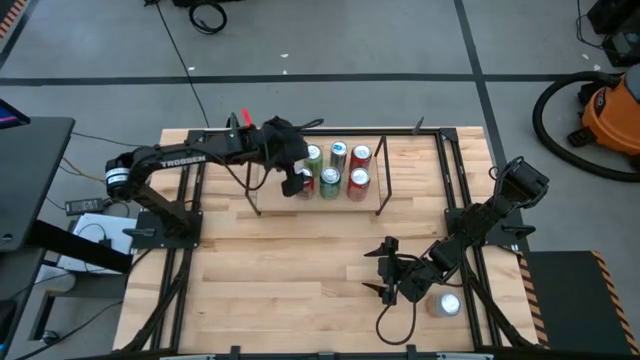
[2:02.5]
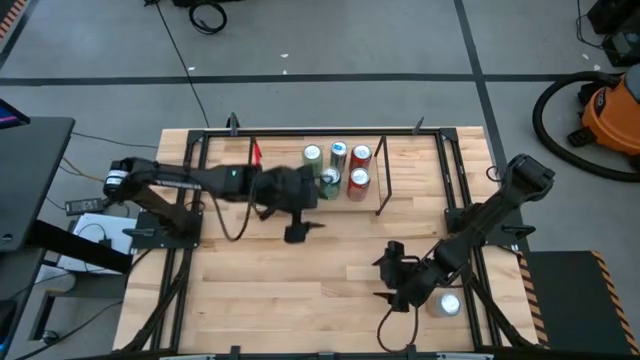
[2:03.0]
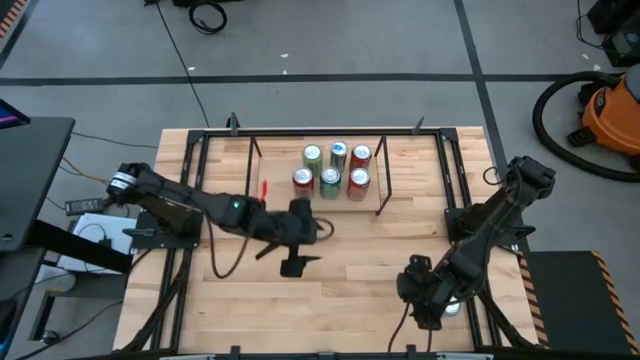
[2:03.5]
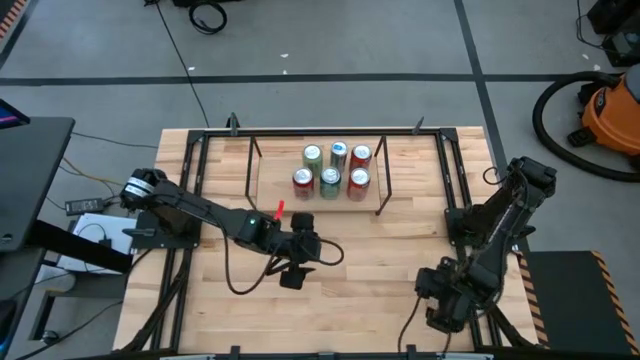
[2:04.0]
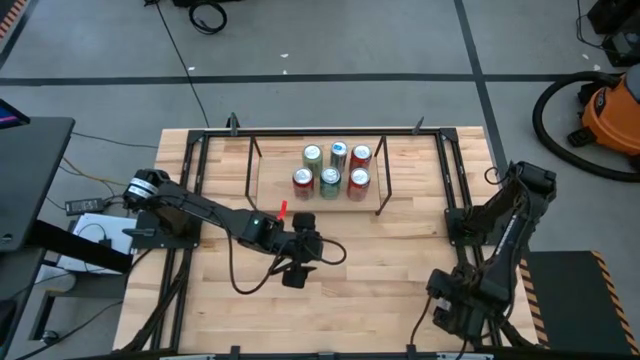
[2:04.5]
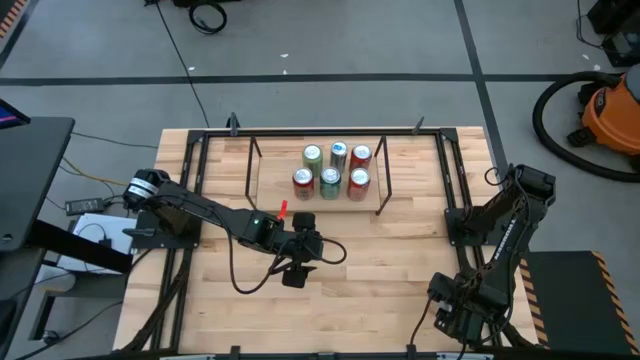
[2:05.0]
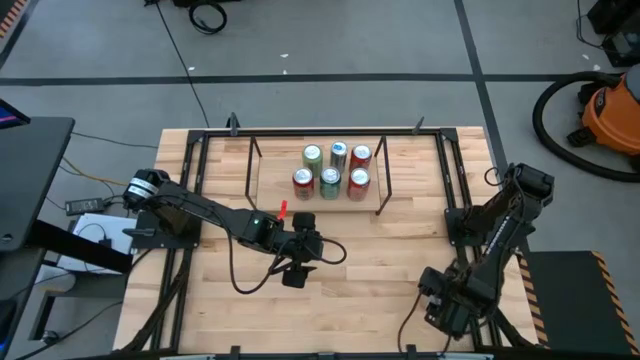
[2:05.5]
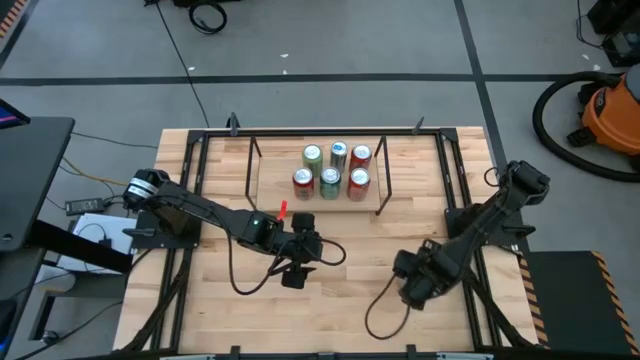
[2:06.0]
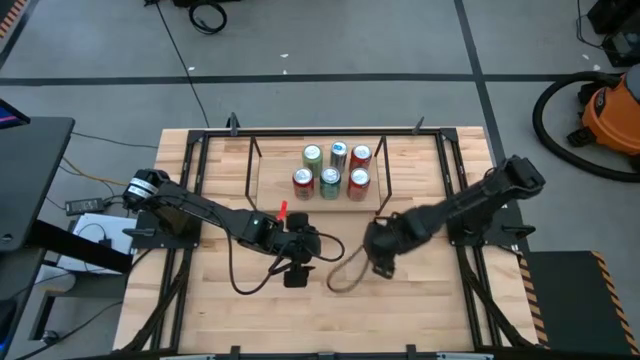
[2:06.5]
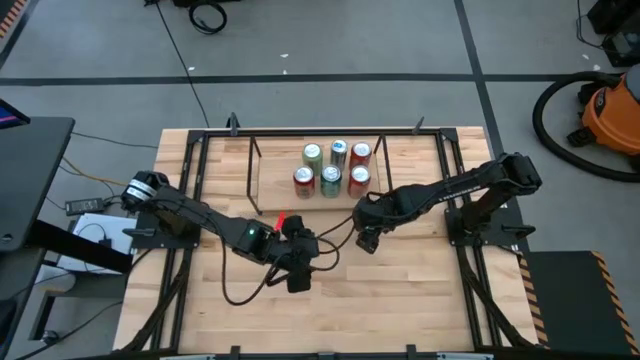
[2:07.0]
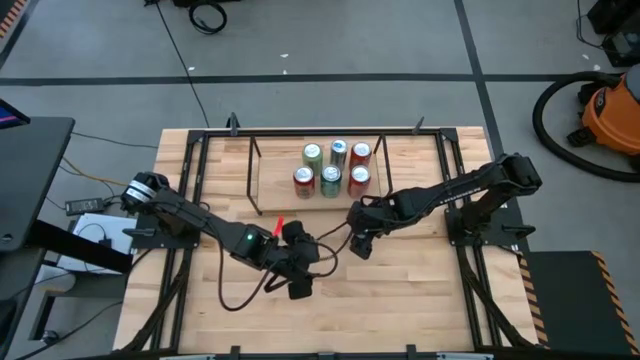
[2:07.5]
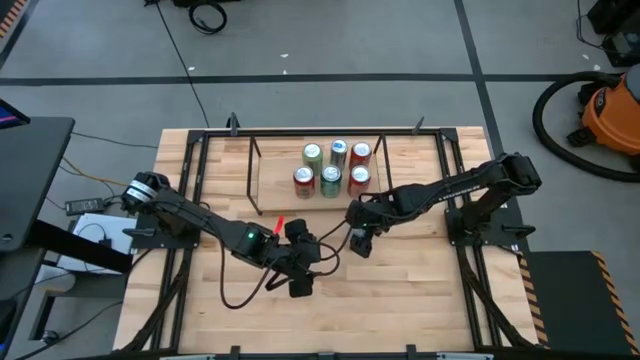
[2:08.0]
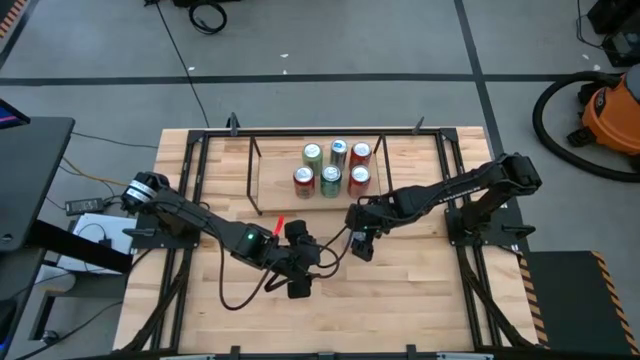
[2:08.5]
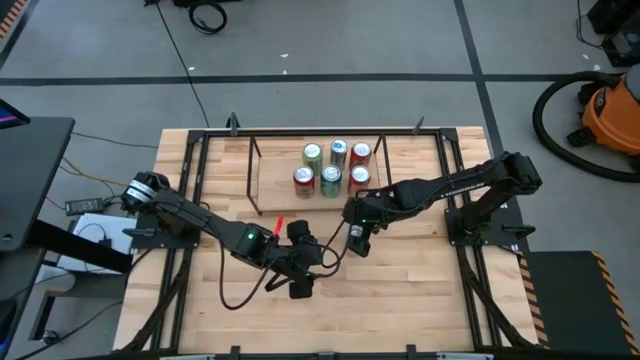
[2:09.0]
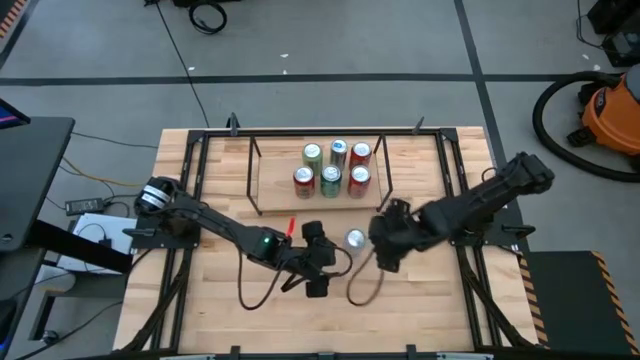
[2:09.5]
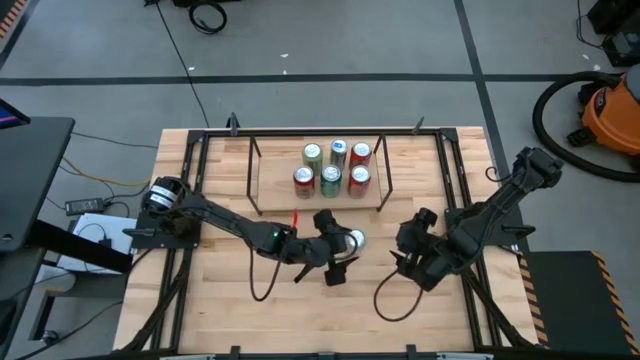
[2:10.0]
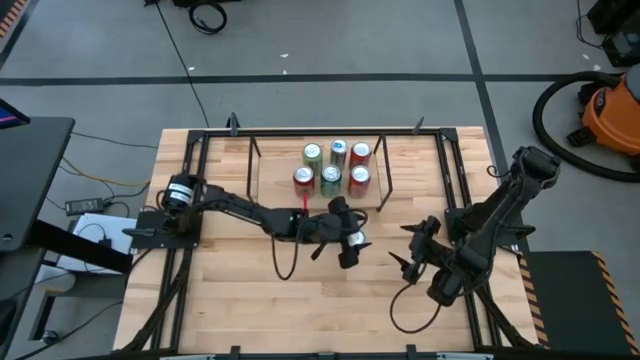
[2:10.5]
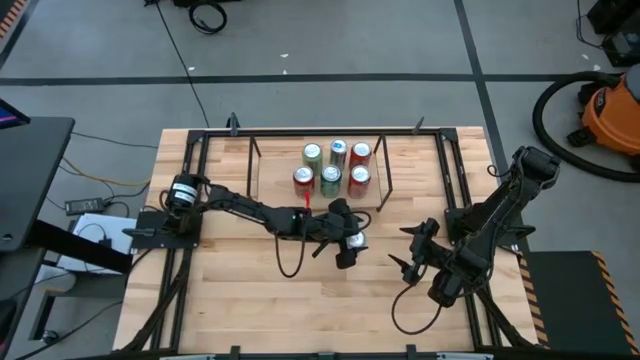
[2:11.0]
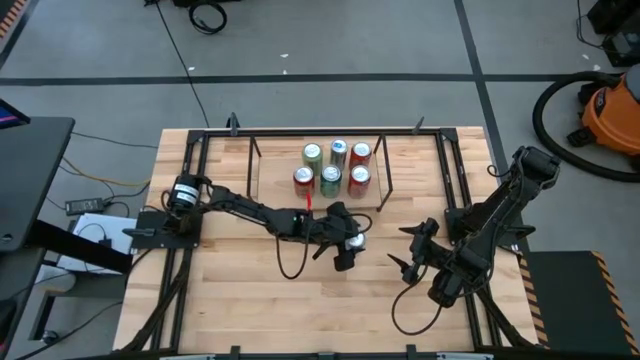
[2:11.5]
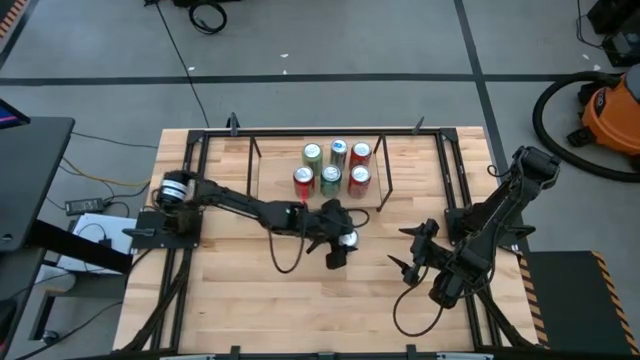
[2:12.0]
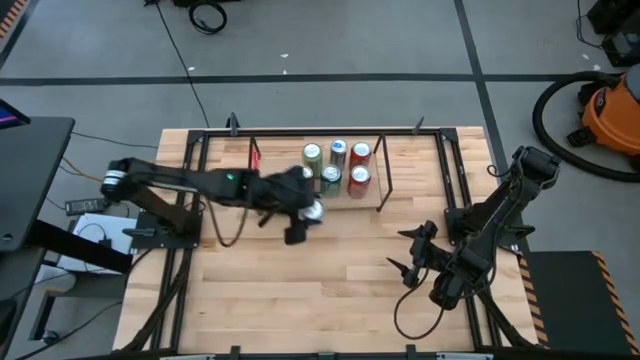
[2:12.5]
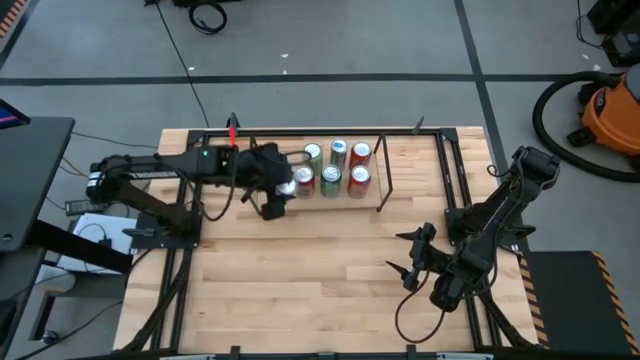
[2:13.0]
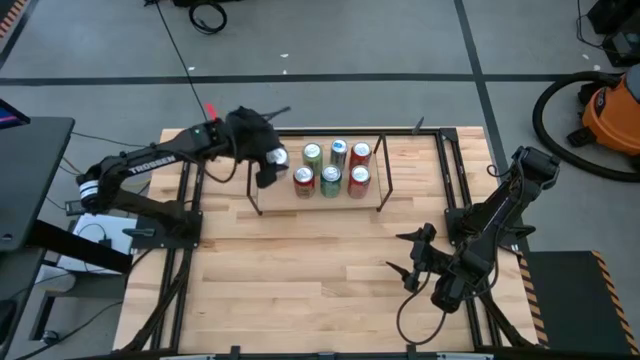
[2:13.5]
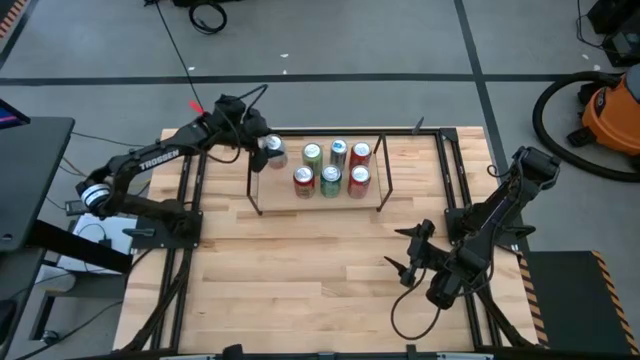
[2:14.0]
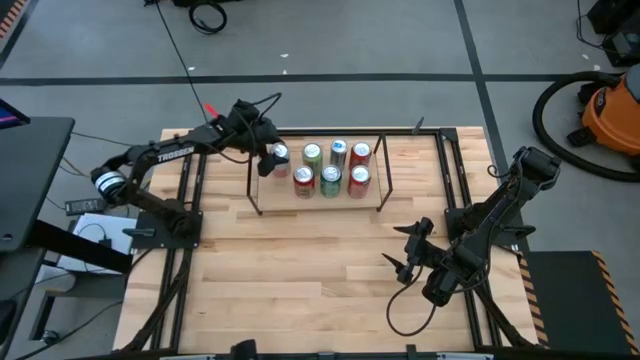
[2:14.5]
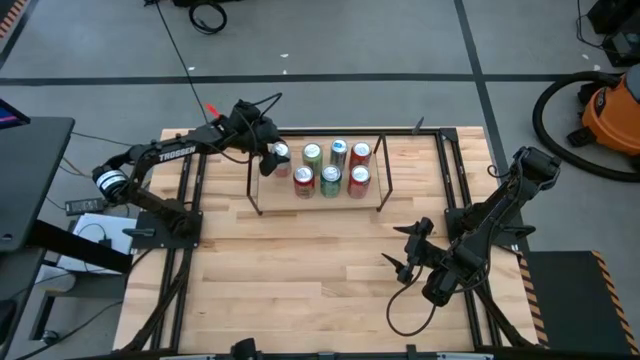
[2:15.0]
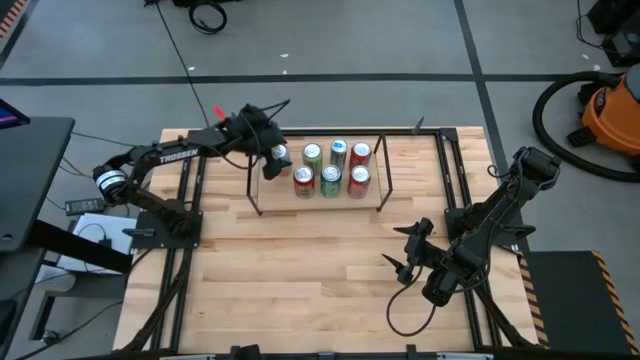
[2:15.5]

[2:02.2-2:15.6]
Task: Place canned beverage on shelf
Put the orange-white soda can on the shelf
